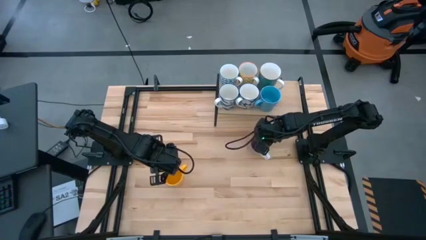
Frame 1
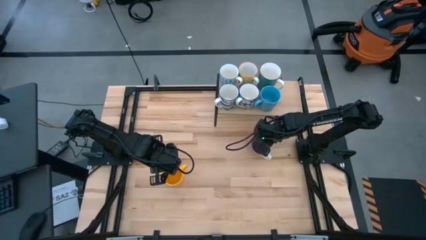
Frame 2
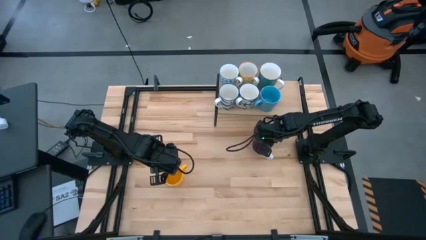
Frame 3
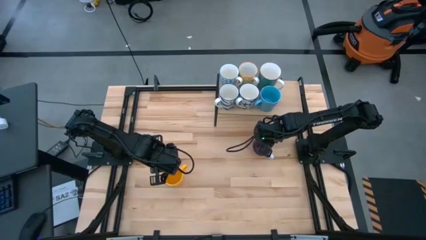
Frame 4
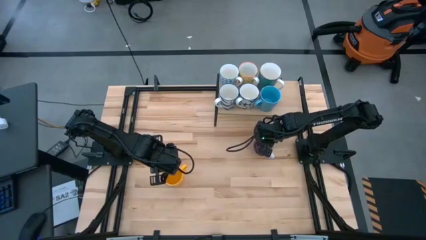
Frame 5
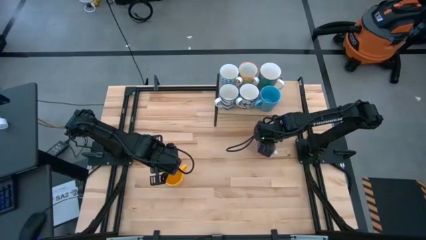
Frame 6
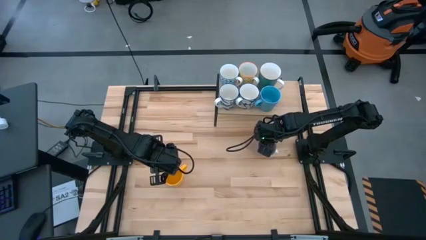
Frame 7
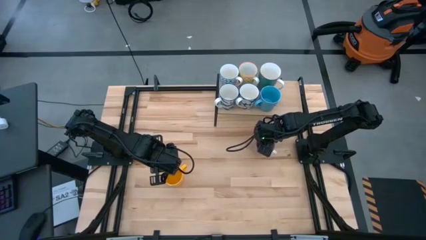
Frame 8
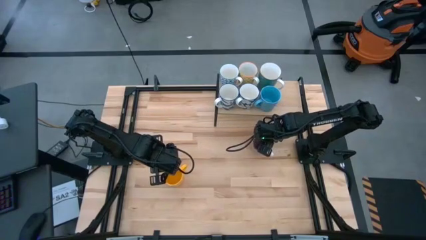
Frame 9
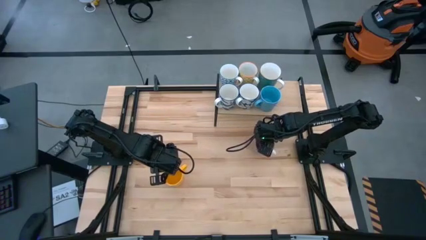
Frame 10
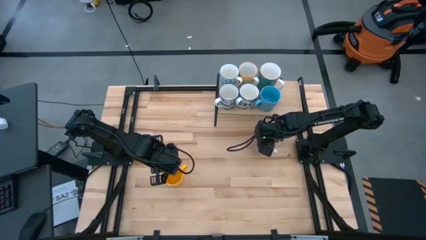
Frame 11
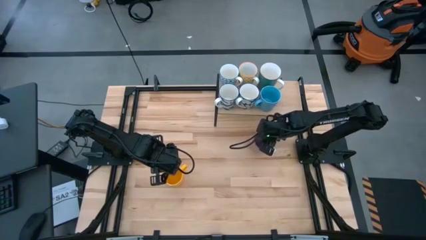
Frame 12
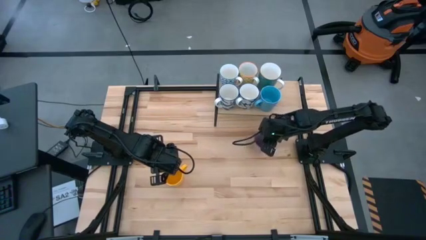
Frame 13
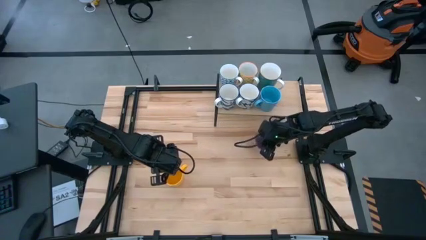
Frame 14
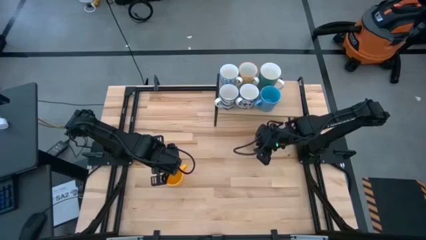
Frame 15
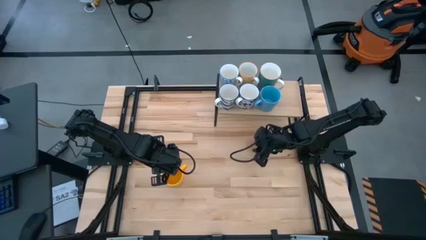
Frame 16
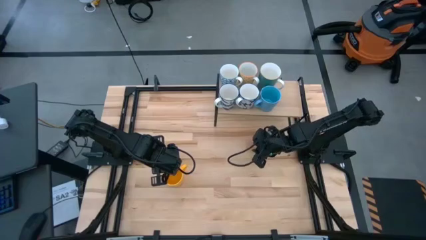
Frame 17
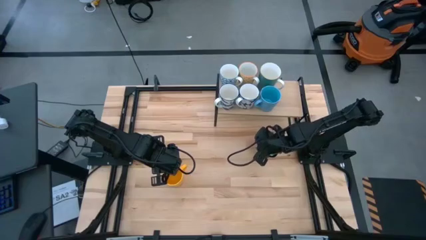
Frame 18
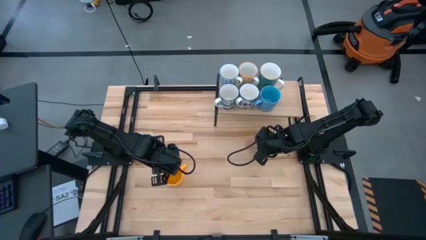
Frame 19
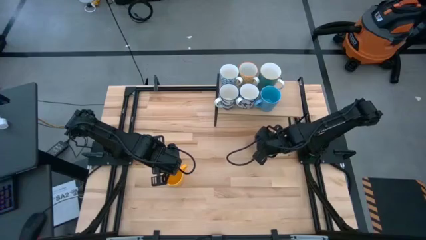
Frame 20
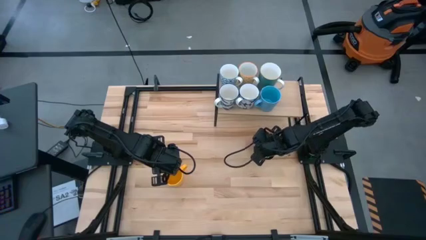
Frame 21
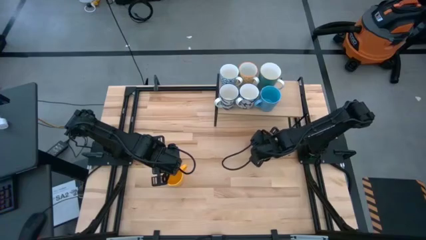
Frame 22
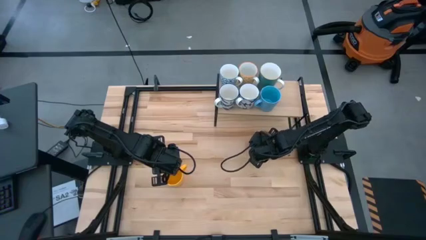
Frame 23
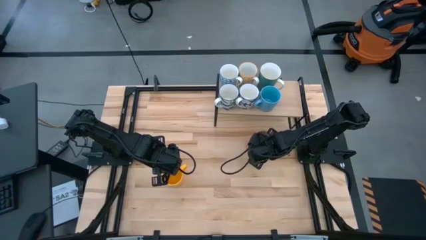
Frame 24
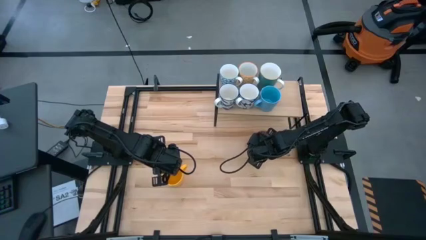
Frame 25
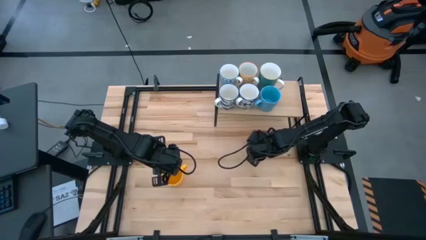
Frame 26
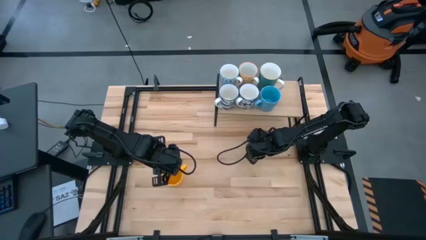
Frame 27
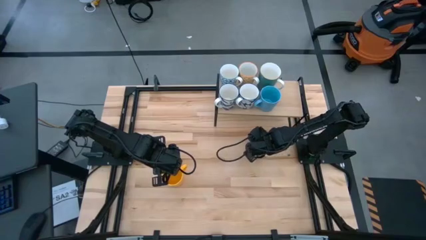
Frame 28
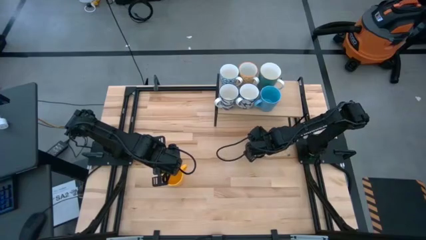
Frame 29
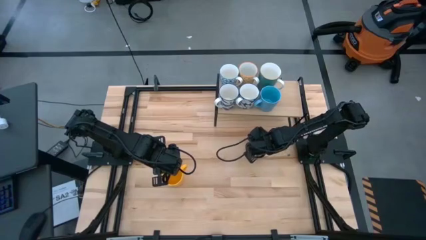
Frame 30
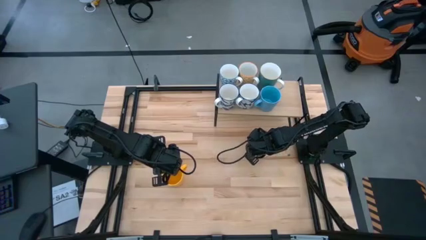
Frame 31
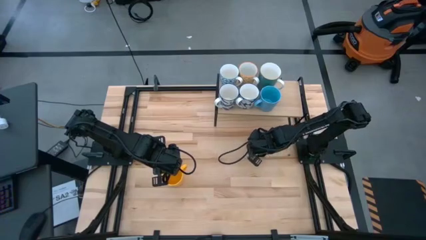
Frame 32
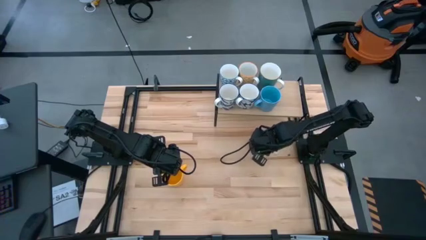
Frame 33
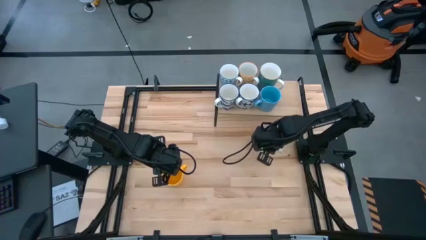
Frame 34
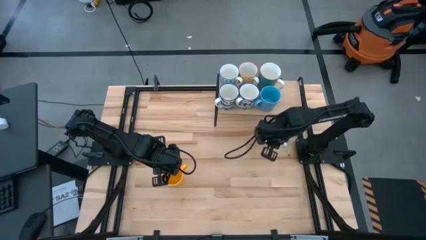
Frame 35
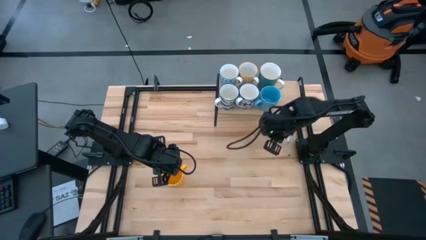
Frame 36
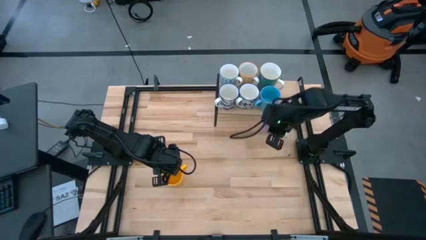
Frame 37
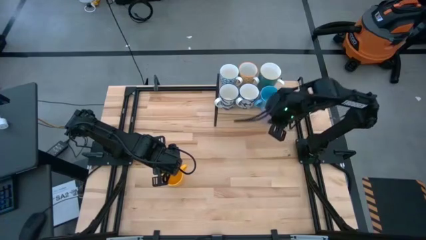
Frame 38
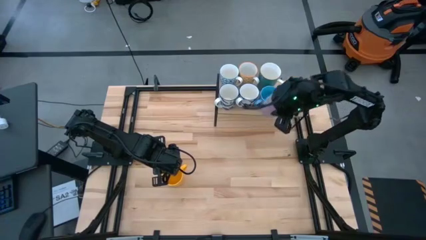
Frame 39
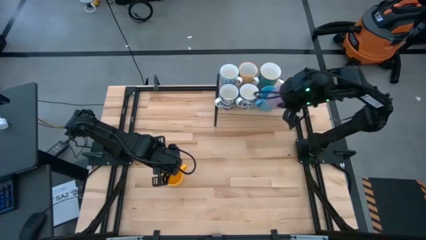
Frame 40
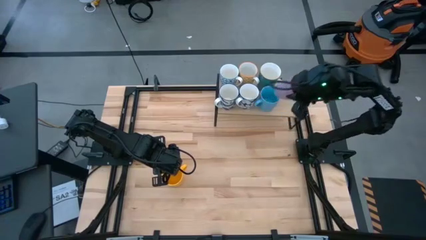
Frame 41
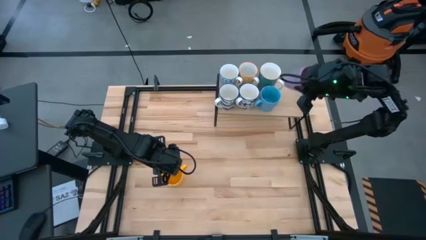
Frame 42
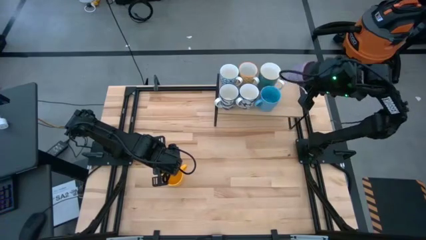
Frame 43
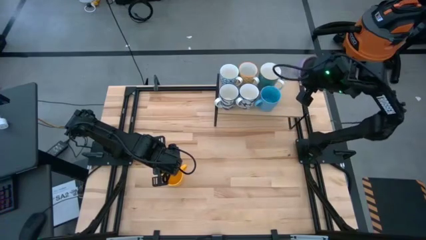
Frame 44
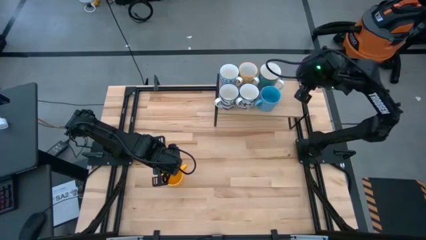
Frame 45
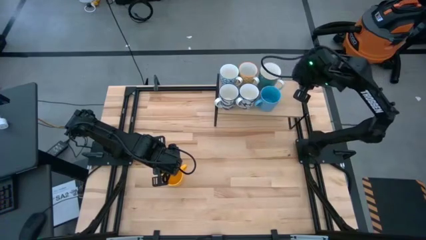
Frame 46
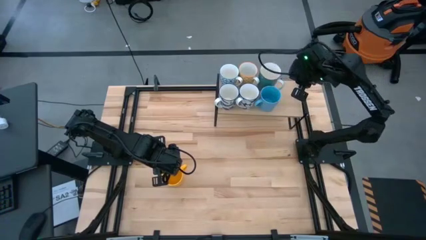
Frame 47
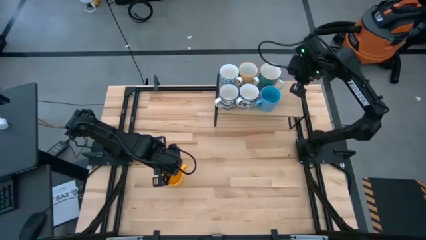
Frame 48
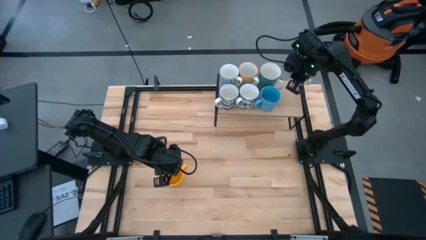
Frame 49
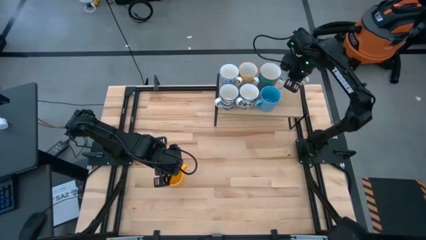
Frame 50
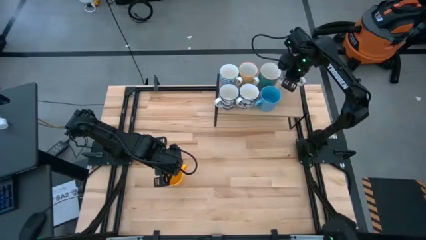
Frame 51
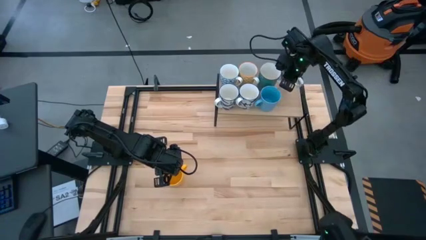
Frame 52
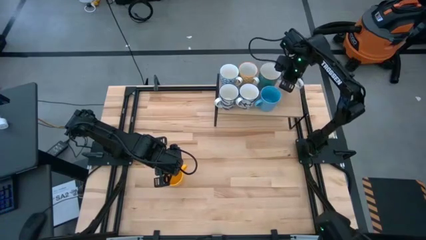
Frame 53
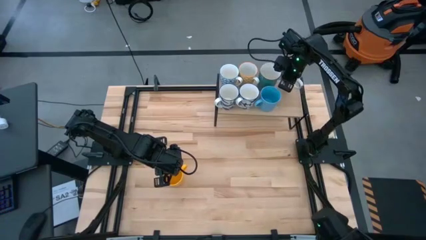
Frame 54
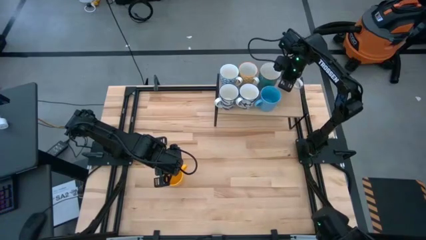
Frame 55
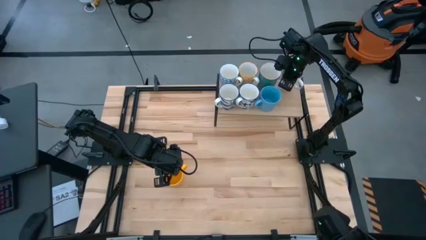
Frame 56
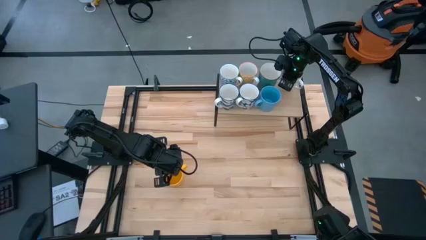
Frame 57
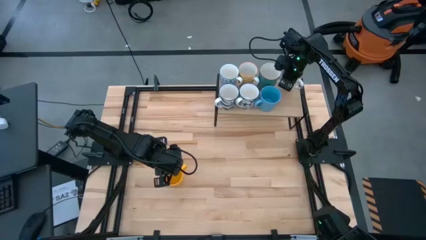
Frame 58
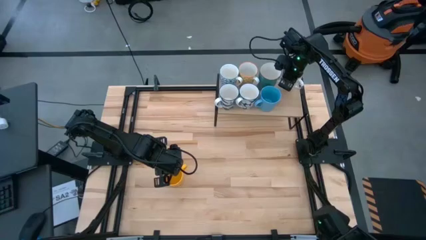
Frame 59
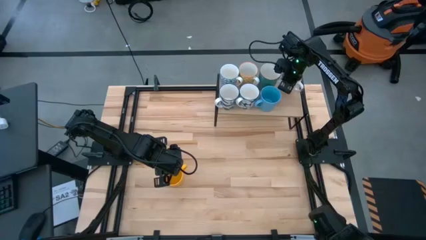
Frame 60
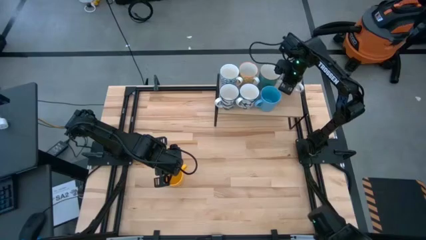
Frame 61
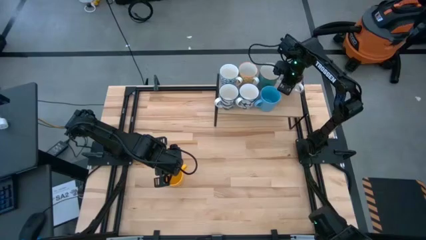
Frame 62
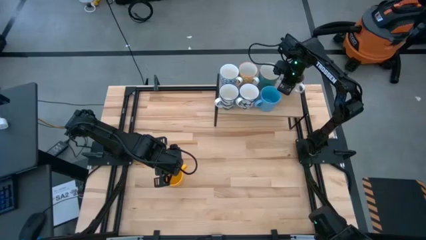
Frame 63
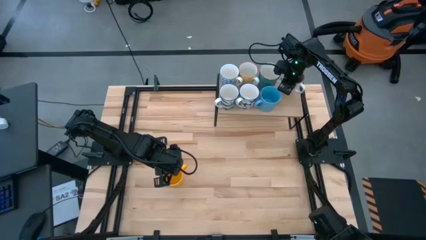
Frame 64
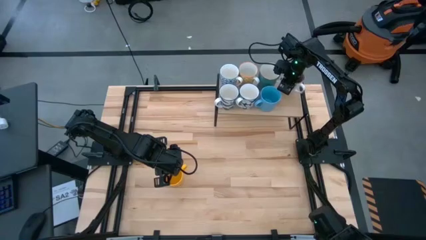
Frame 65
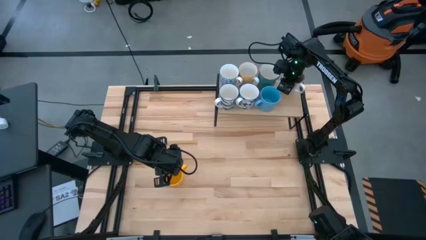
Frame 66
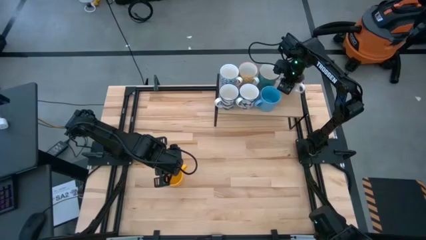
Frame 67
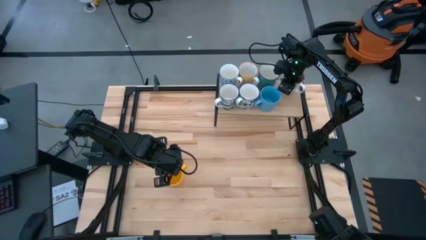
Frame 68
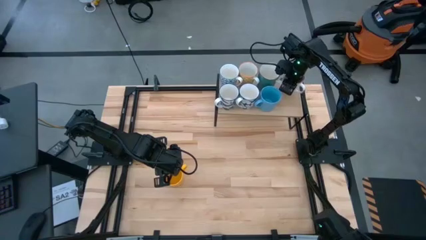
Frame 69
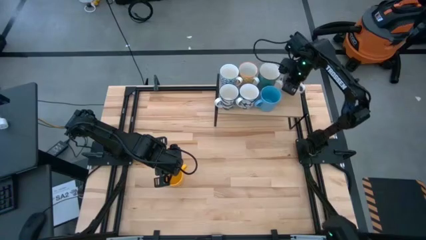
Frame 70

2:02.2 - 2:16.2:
Task: Place coffee mugs
Put the purple mug on the shelf

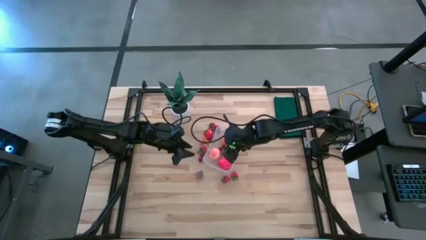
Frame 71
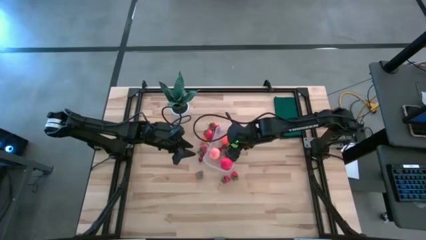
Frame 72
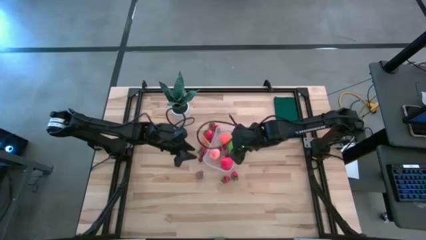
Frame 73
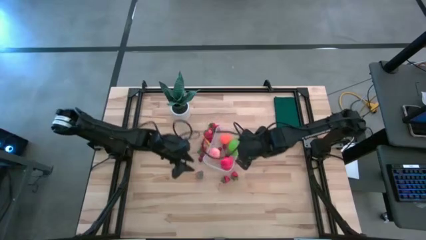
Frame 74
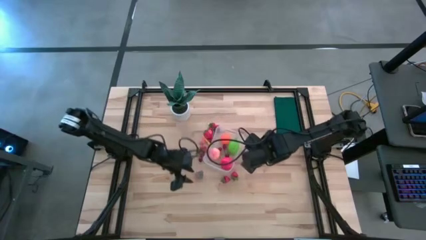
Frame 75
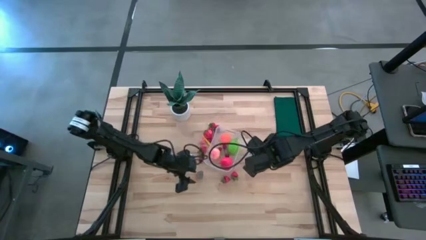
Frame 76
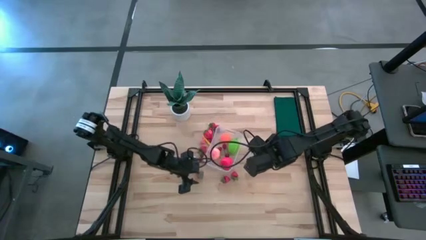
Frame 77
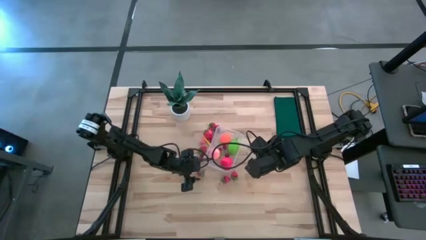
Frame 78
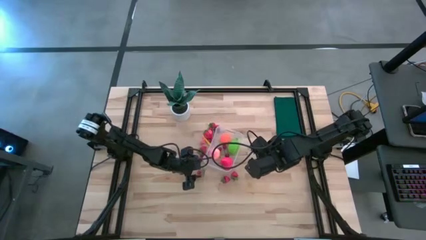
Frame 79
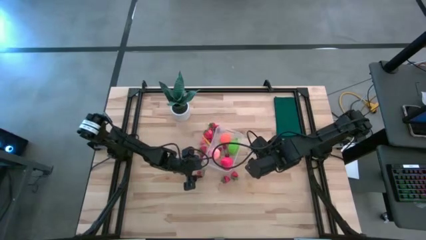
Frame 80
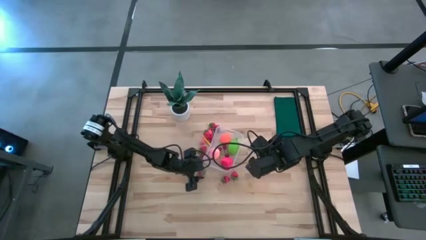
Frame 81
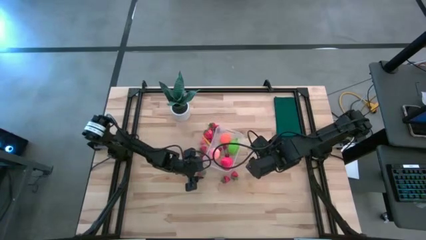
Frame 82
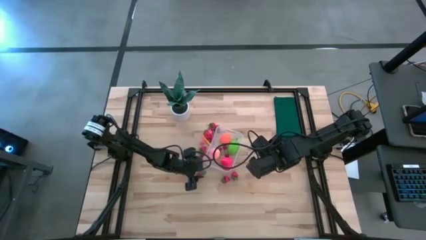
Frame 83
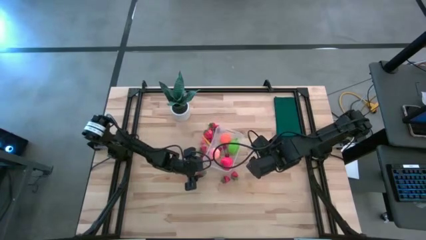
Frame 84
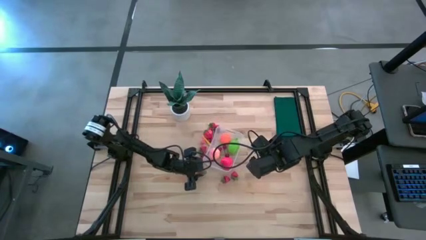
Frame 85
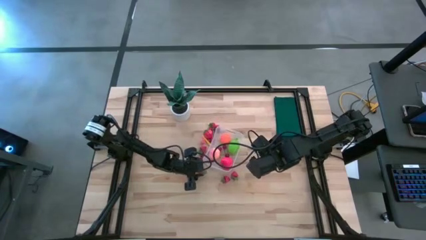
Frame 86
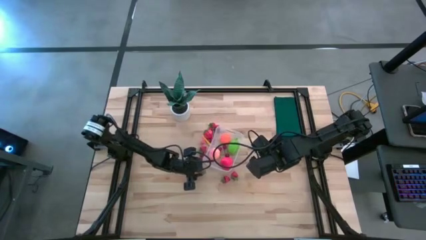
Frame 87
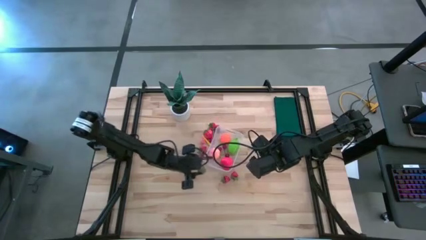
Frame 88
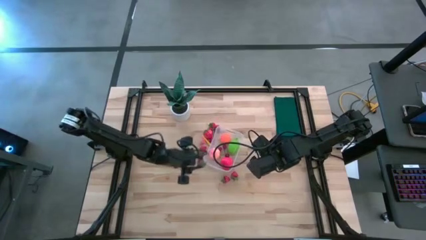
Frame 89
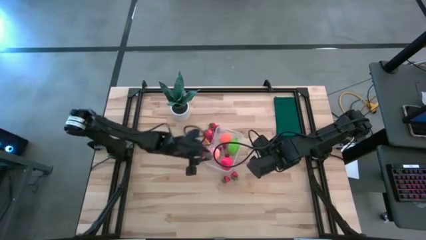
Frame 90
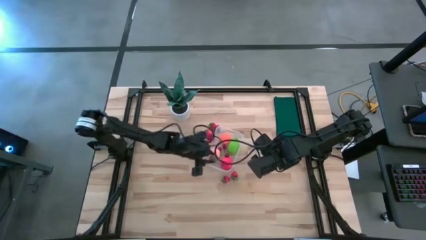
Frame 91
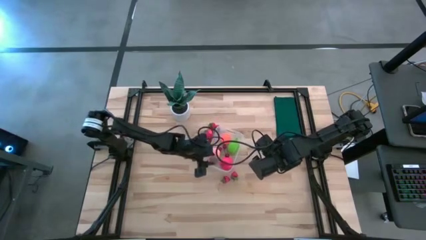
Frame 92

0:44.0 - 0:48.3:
Task: Pick and placing Produce into tupperware
Put the red strawberry into the container
